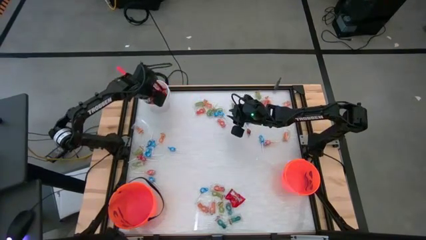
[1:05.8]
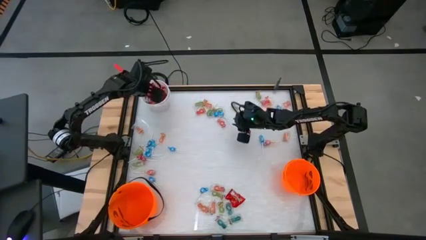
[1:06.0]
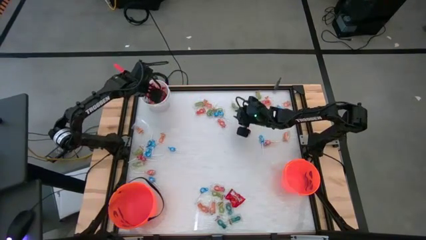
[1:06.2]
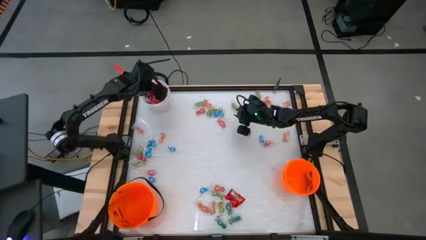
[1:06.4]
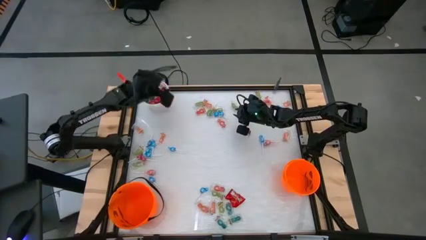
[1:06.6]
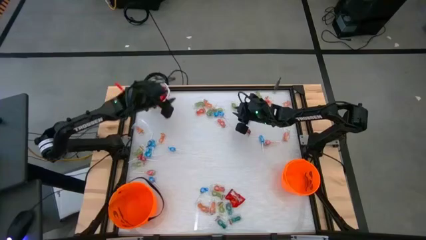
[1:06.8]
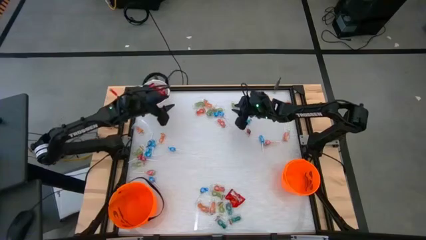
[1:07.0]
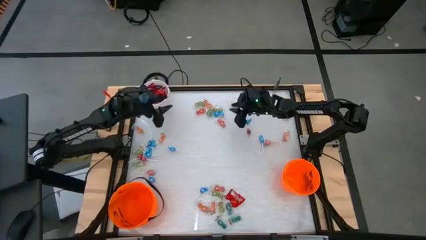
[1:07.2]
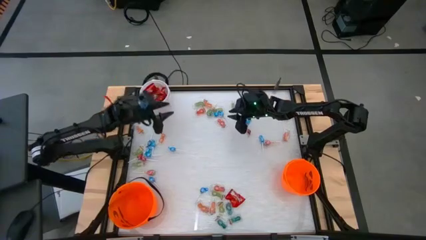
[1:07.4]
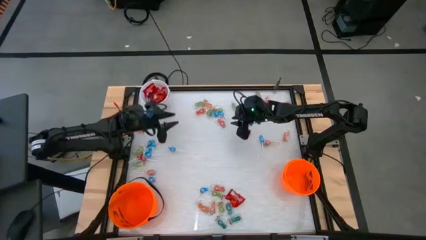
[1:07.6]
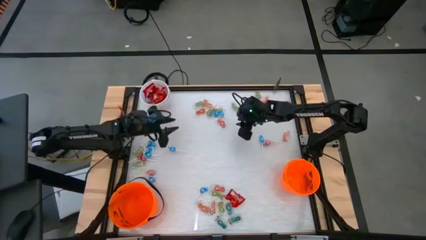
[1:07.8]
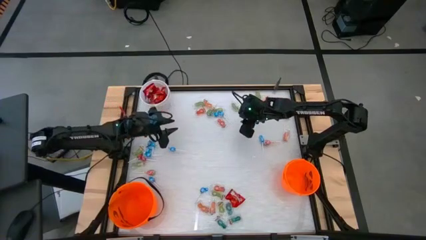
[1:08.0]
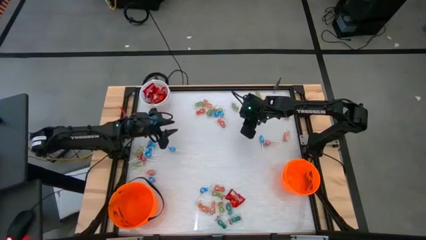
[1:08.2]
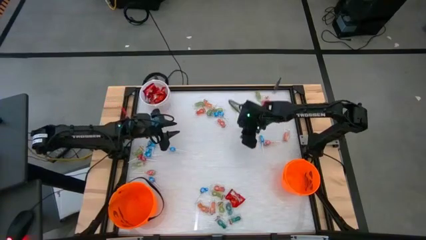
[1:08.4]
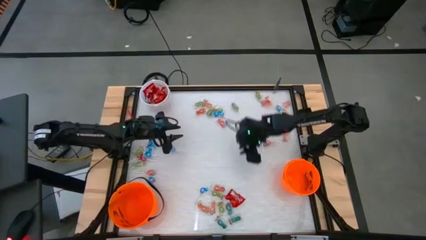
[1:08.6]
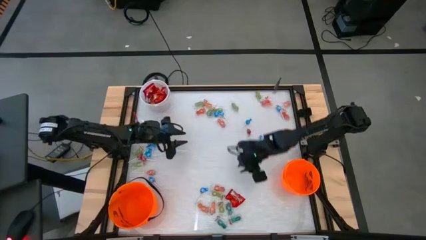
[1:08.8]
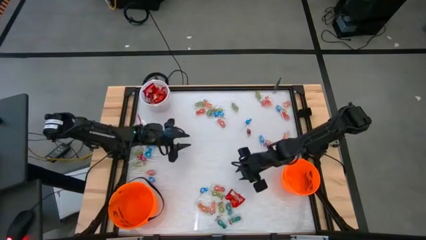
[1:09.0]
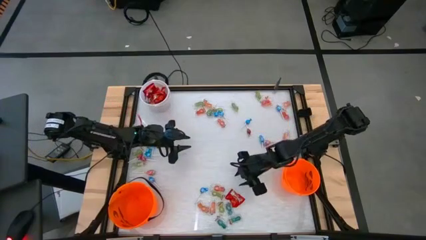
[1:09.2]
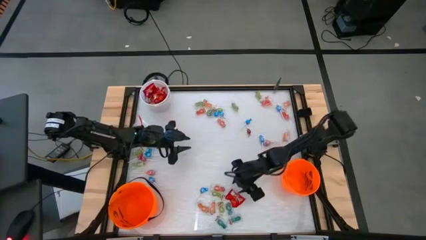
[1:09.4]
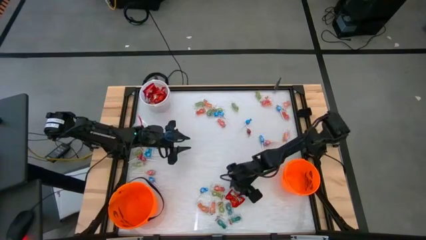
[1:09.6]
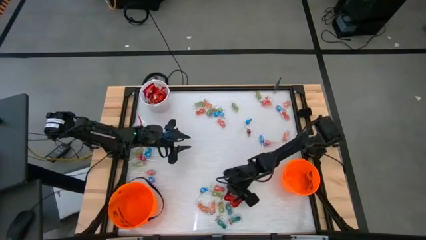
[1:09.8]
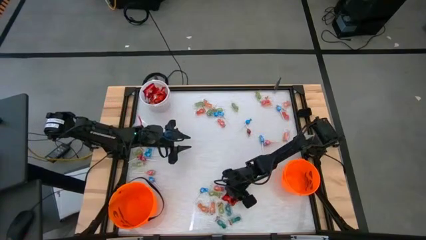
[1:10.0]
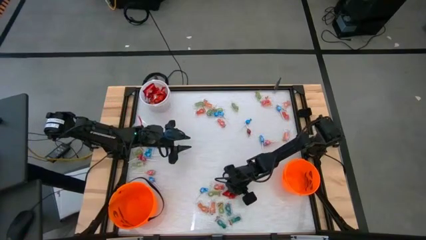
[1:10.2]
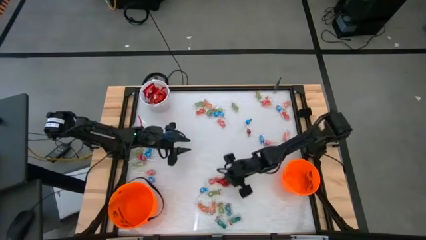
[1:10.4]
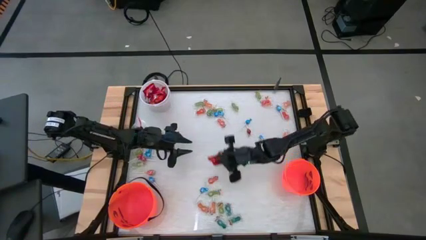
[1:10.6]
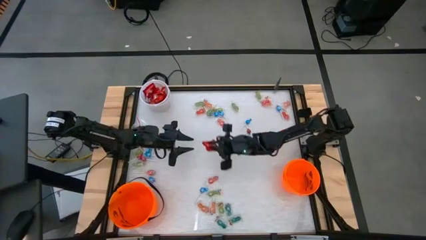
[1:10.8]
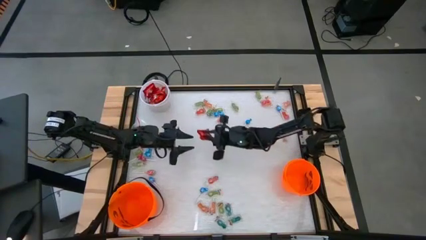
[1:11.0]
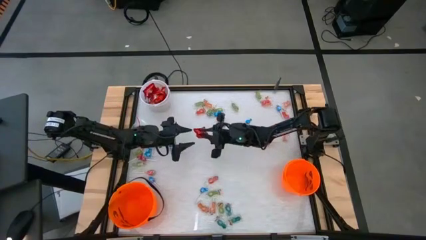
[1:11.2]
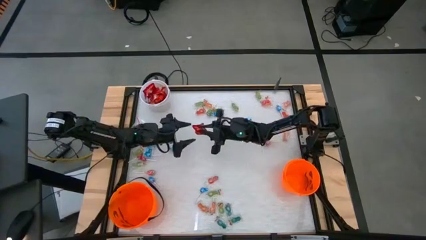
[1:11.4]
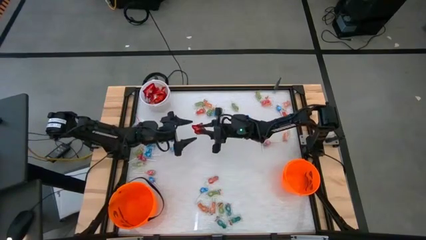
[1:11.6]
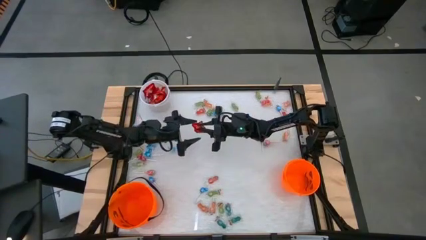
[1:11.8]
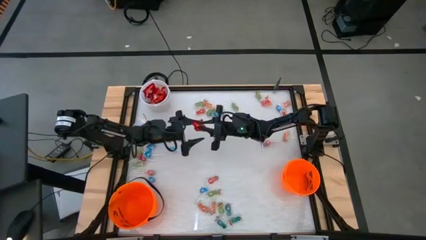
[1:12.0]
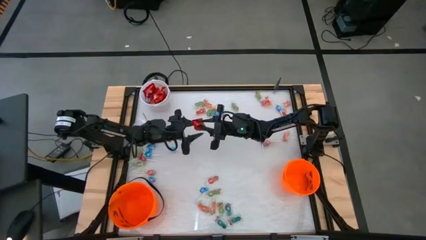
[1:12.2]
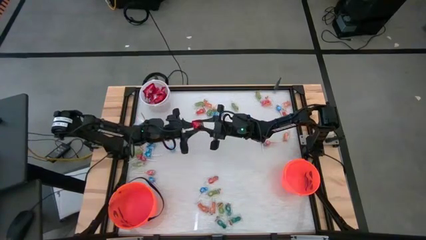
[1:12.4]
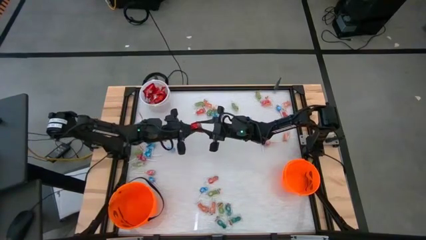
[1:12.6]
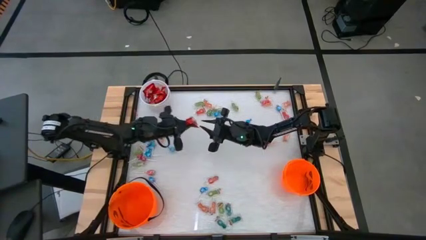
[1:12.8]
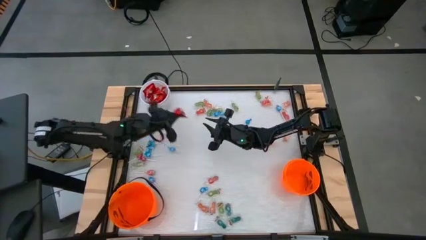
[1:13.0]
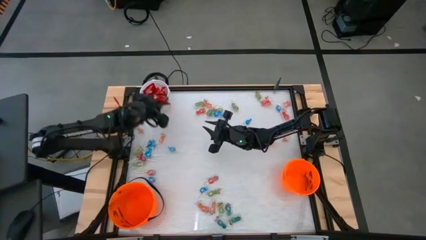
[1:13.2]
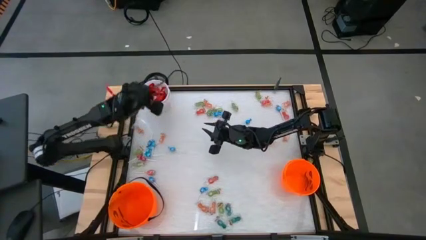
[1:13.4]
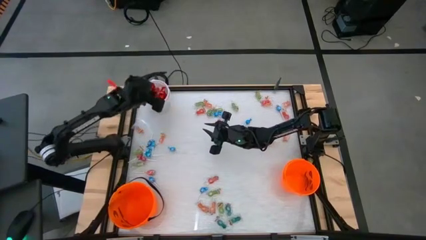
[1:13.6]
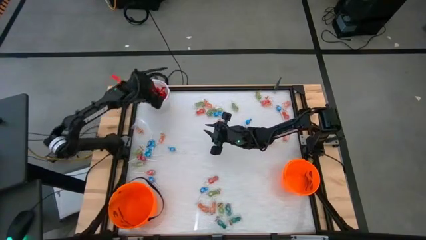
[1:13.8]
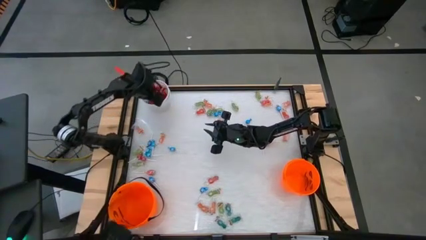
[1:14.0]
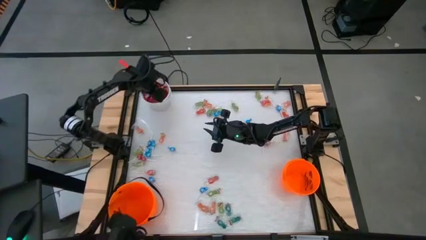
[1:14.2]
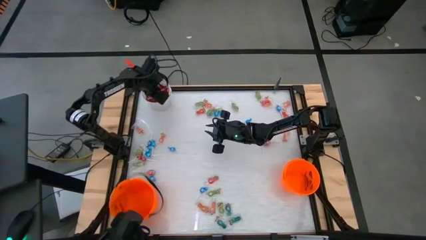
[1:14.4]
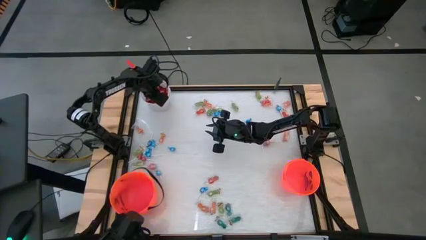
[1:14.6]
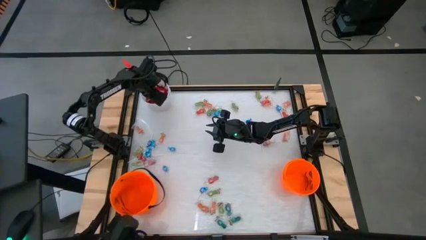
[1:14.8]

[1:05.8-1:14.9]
Task: Sort candy by brand, put in halloween buckets
Put the skittles into the white bucket

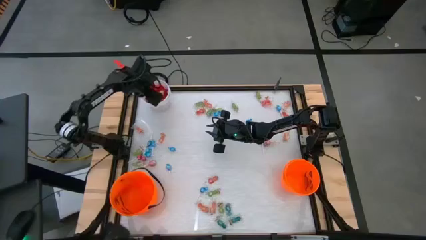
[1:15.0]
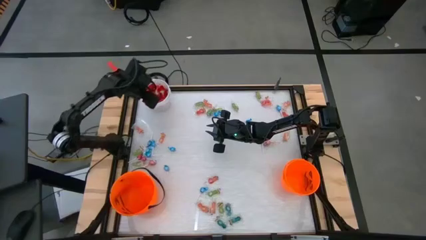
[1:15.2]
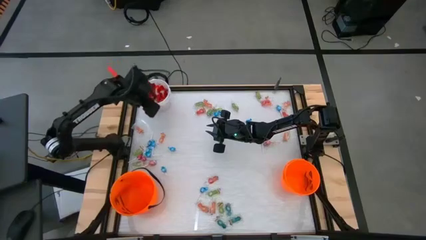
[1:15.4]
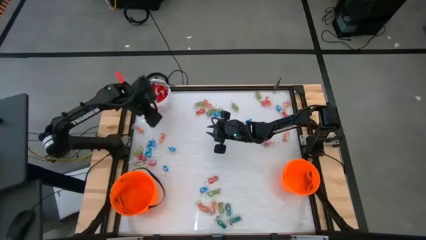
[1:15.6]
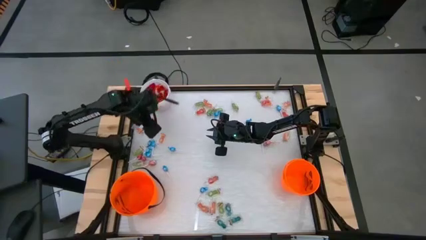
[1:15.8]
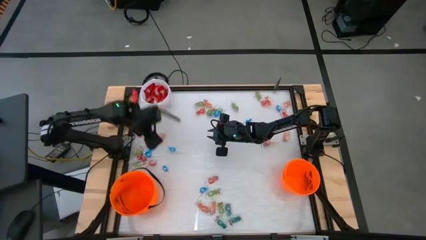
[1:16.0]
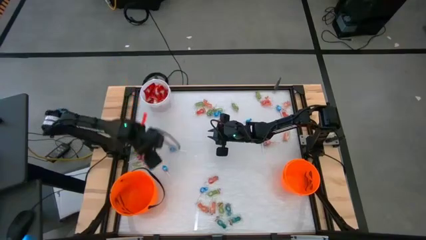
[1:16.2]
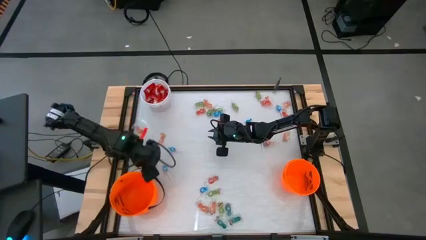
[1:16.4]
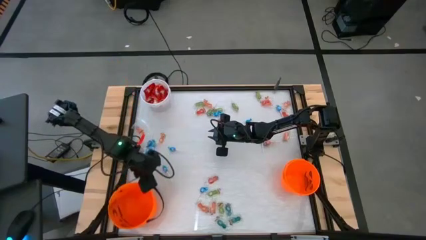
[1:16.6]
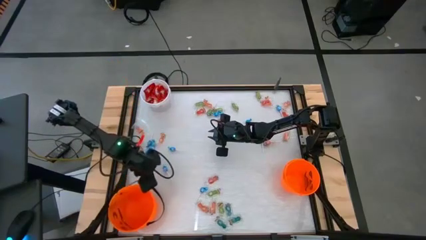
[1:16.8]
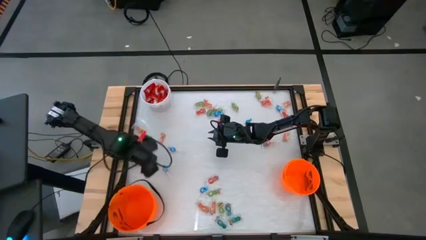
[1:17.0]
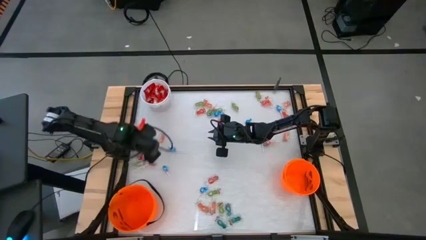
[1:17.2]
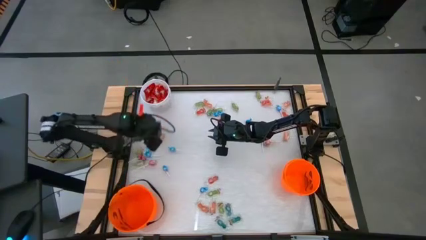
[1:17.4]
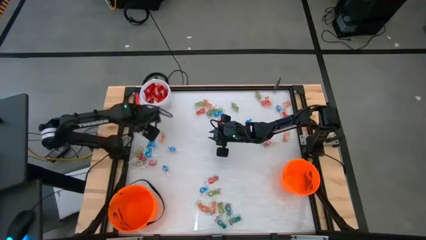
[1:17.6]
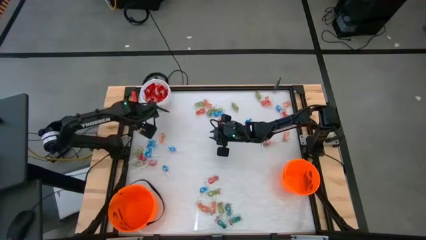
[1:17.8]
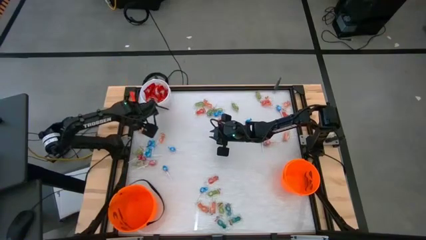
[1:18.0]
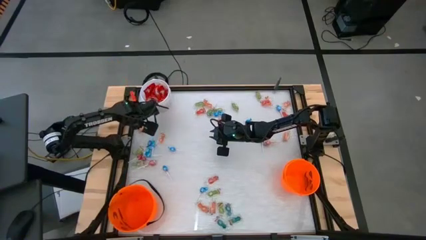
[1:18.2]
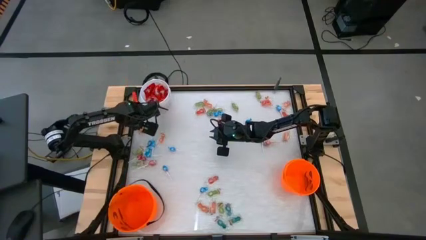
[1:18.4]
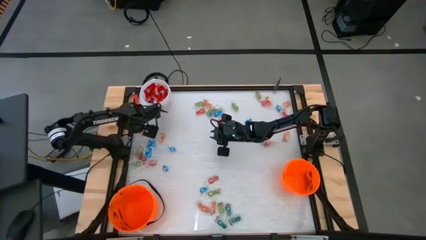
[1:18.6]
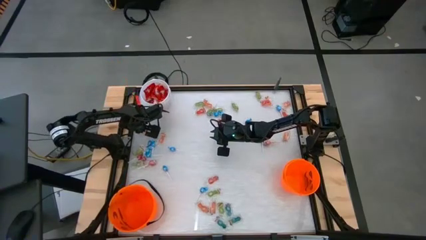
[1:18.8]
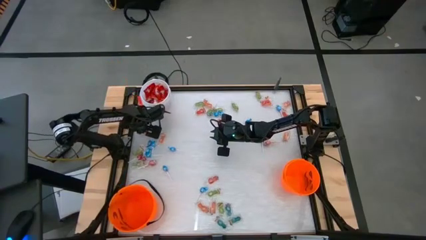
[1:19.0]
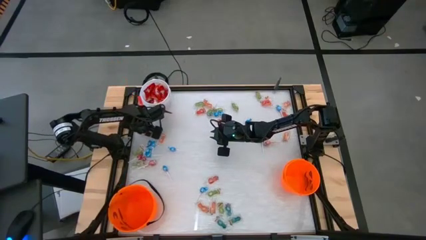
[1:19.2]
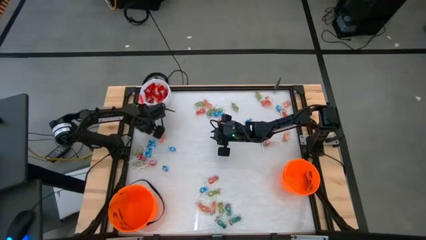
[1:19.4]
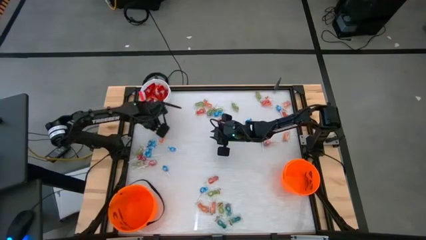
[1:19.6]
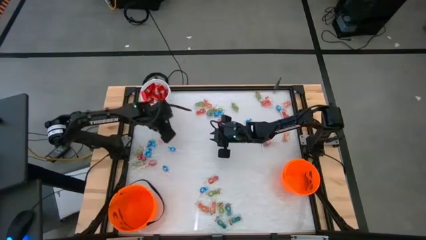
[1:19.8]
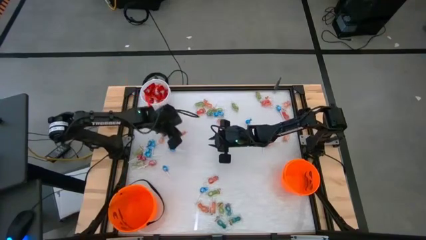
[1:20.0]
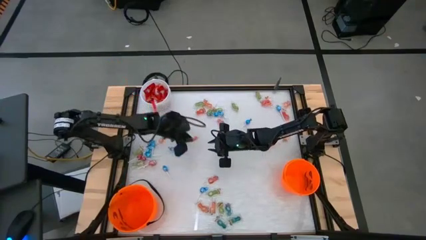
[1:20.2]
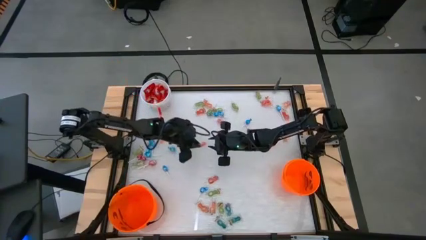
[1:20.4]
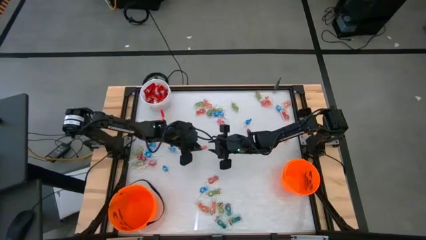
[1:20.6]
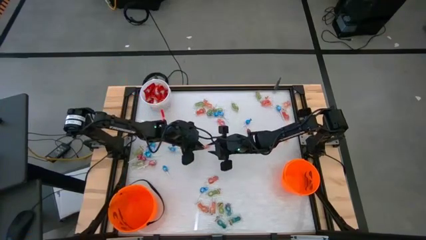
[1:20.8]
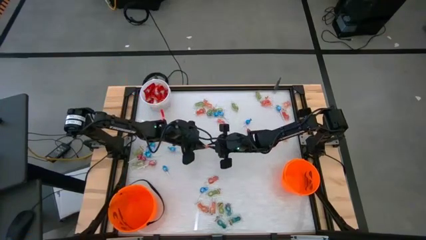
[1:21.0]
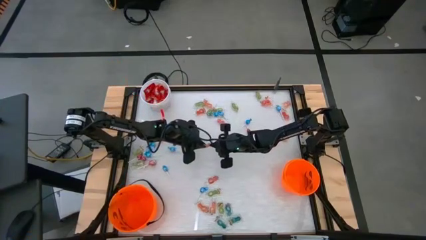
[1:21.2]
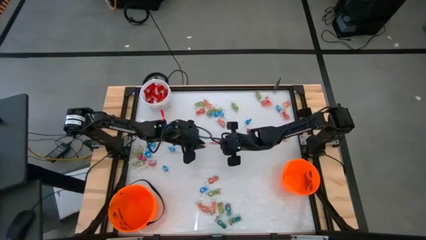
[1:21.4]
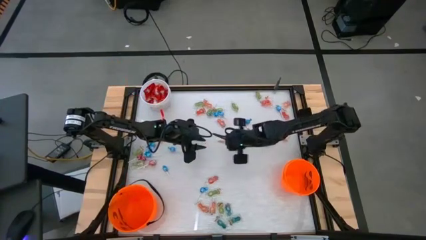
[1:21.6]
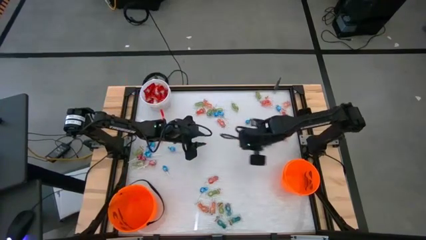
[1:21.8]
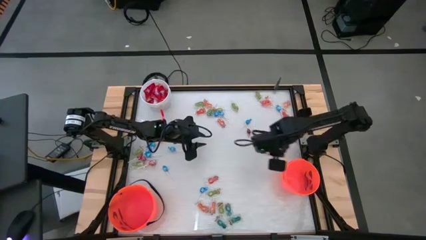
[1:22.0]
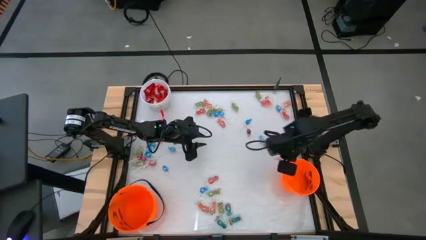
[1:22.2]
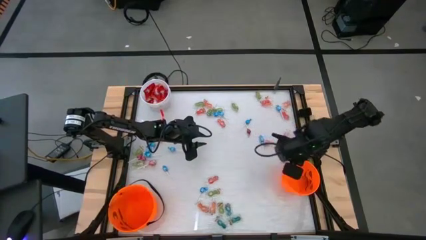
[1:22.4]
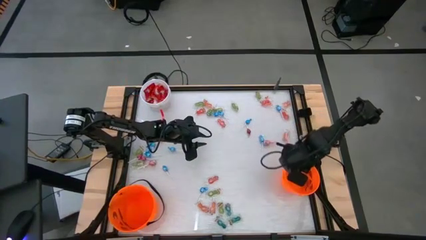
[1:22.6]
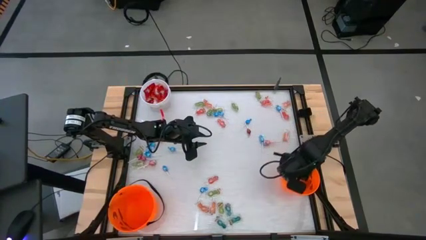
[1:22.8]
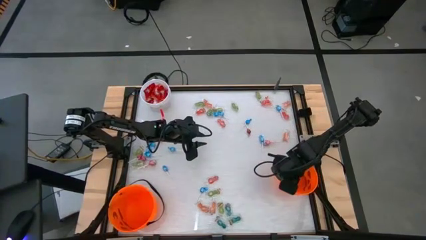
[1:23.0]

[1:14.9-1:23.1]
Put the orange candy into the right orange bucket
